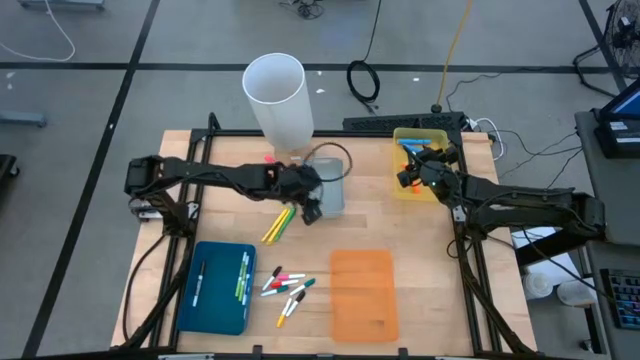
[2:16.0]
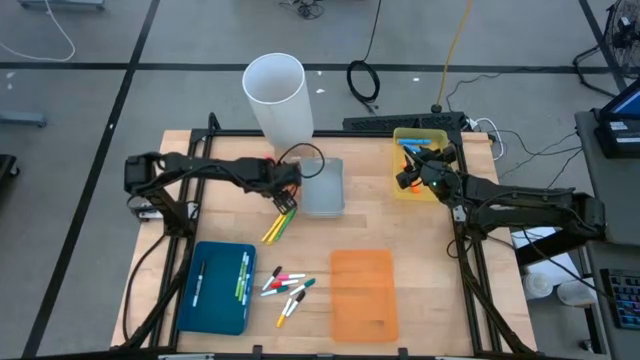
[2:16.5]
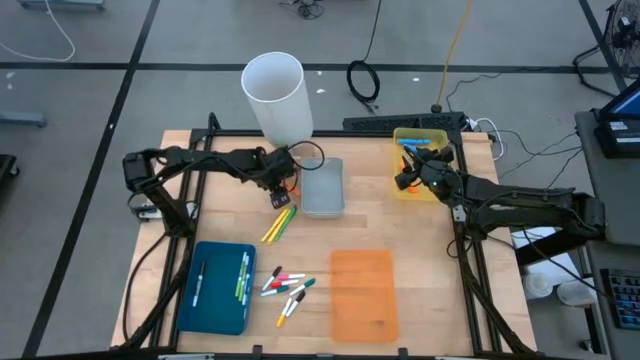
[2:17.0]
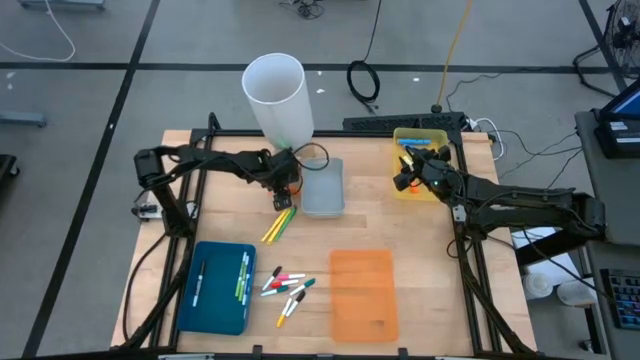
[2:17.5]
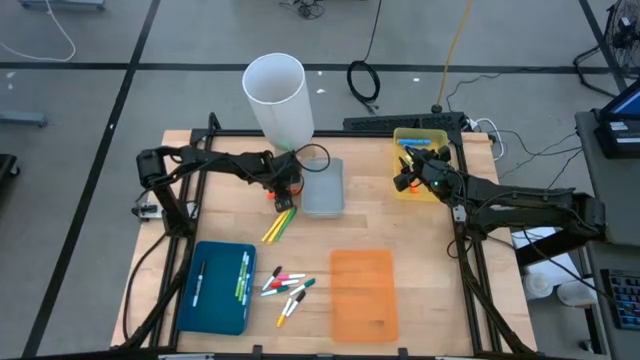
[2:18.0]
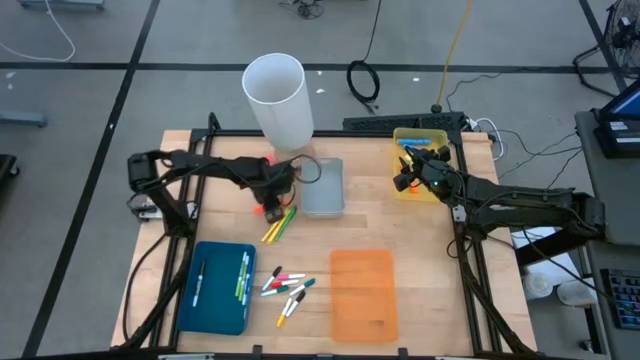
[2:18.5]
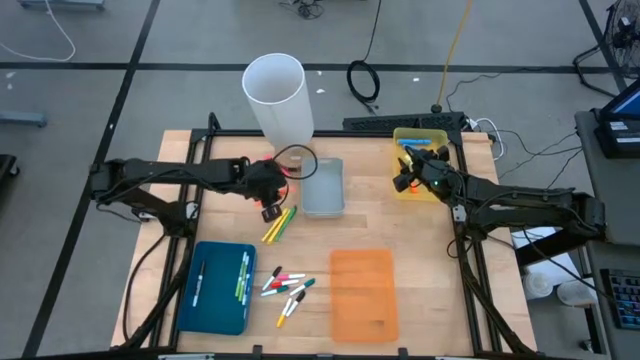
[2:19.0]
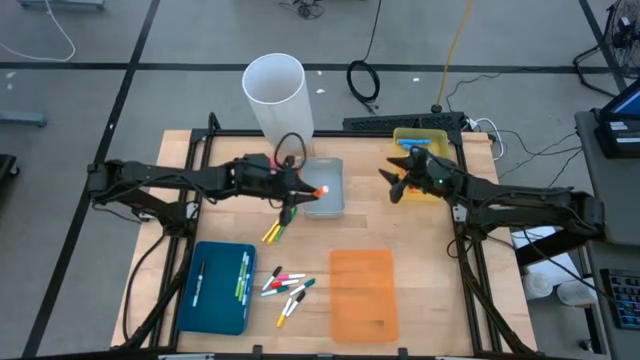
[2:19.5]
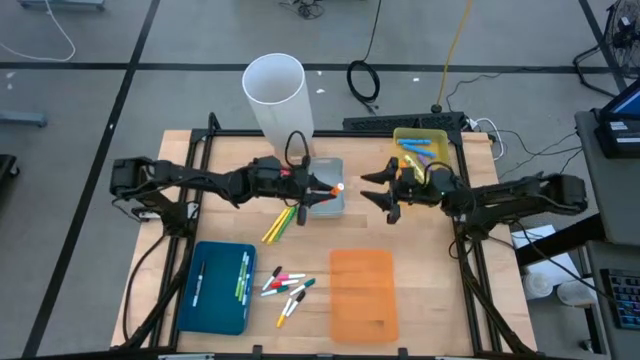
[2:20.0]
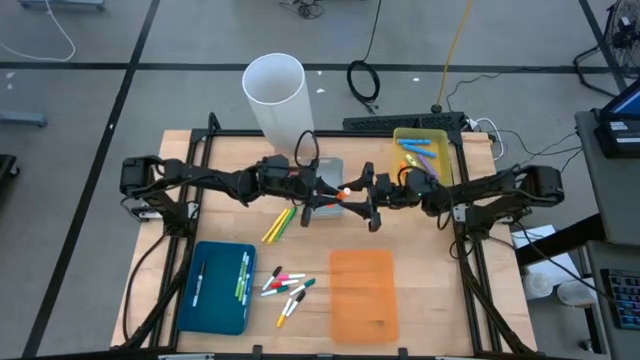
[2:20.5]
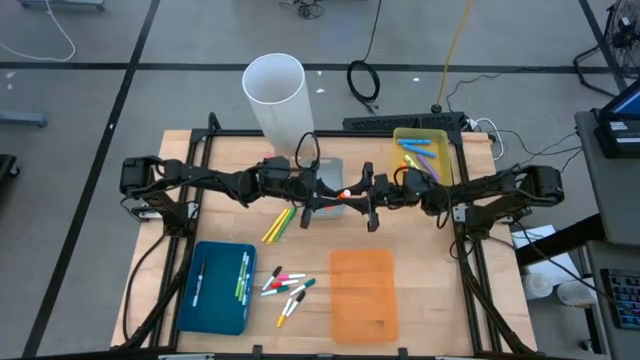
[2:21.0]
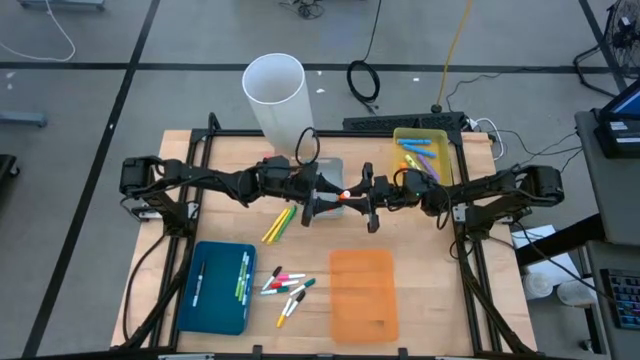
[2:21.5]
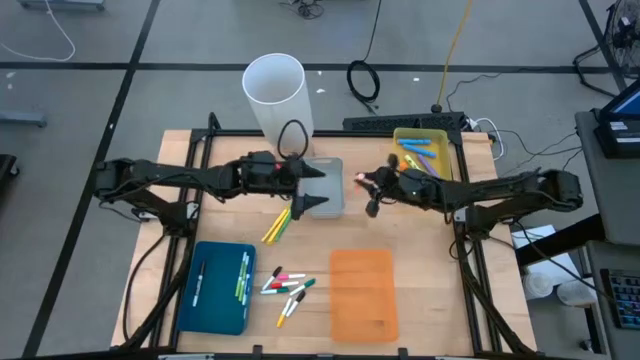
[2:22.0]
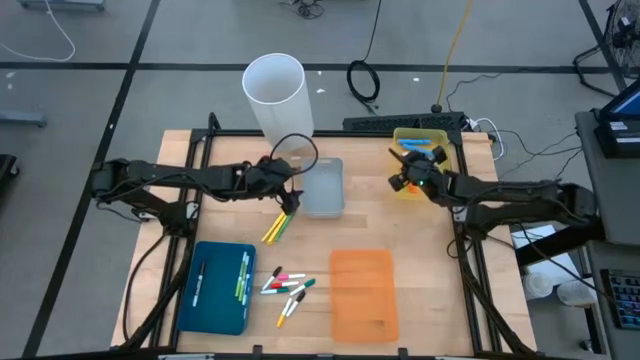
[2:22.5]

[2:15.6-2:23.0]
Task: Pick & Place Markers
Put the large orange highlighter pen in the yellow bin

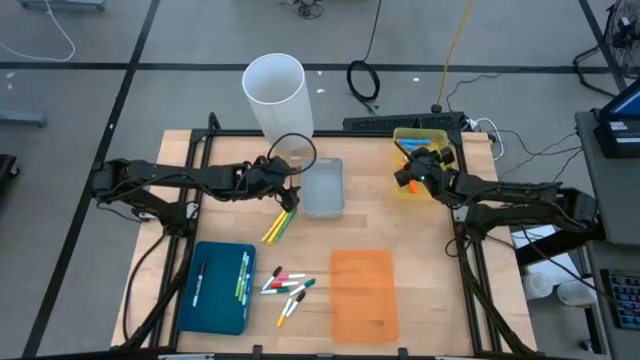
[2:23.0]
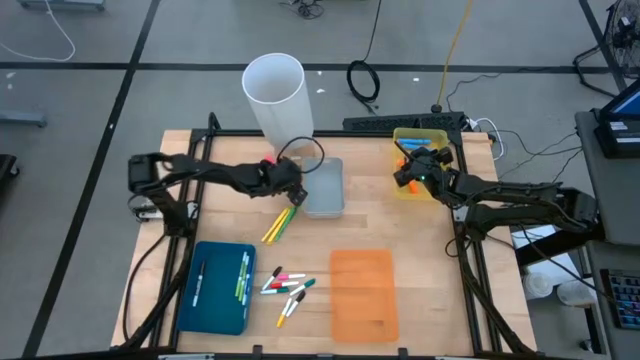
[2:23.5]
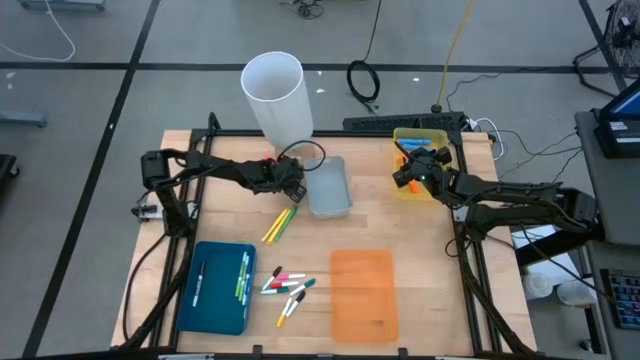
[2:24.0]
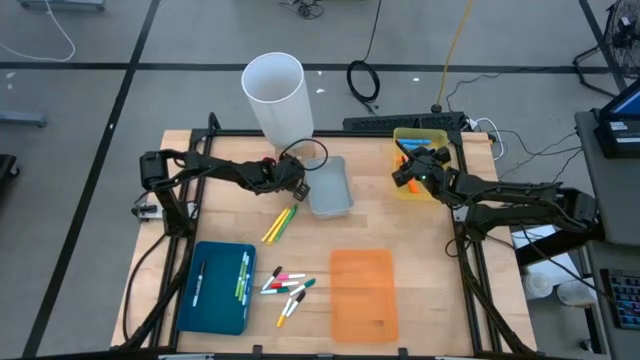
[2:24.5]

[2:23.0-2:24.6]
Put the large pink highlighter pen in the yellow bin

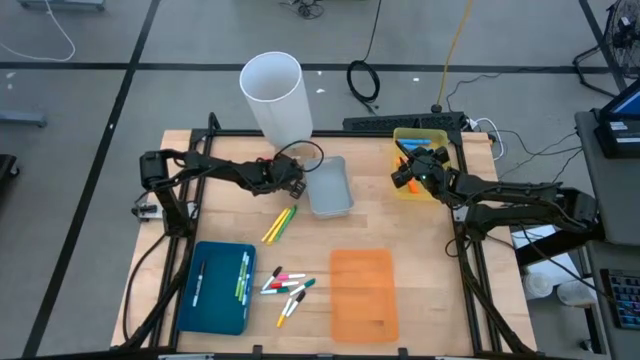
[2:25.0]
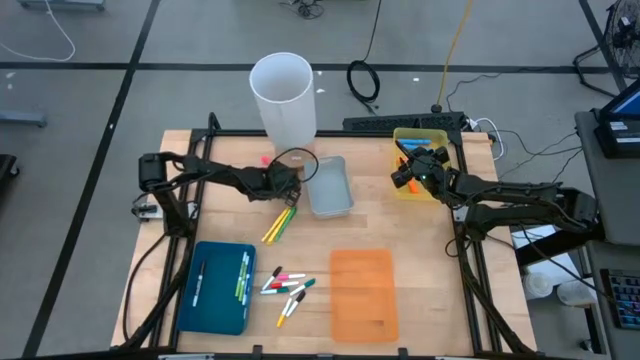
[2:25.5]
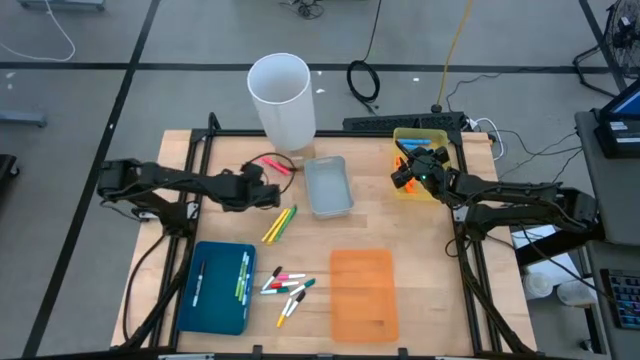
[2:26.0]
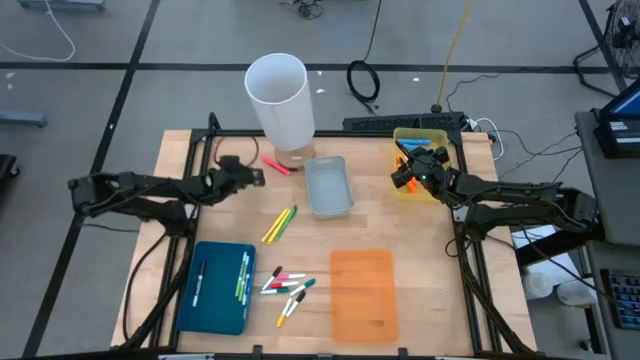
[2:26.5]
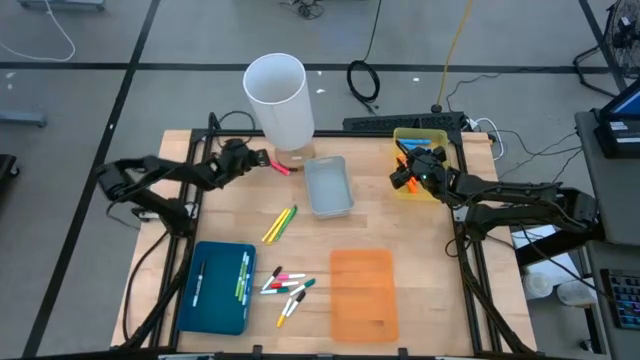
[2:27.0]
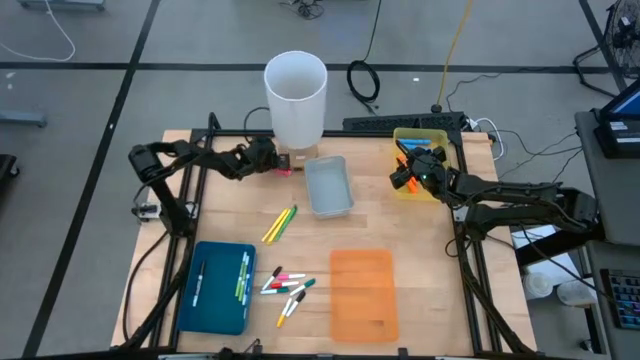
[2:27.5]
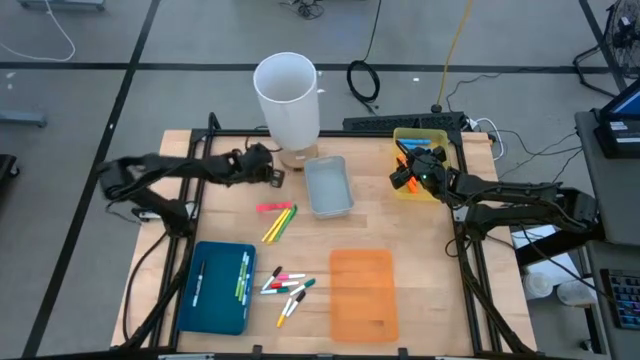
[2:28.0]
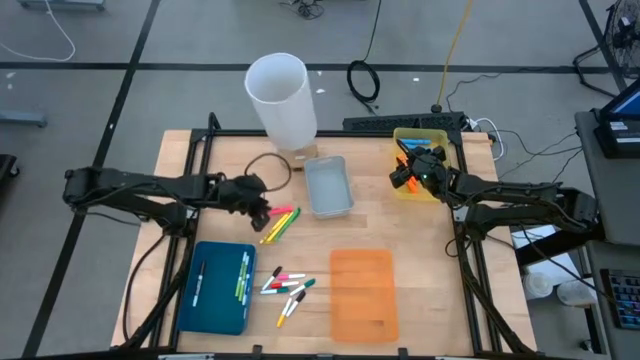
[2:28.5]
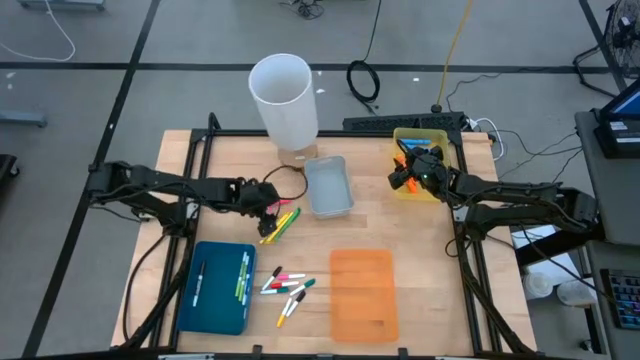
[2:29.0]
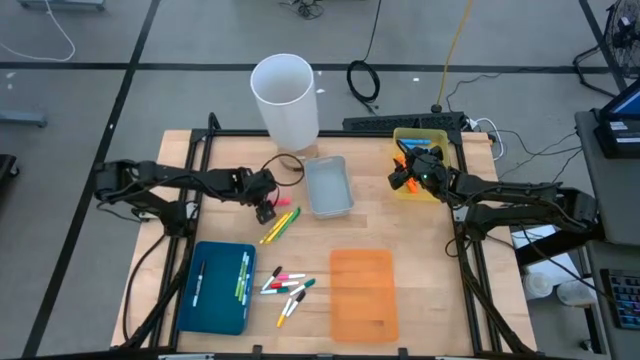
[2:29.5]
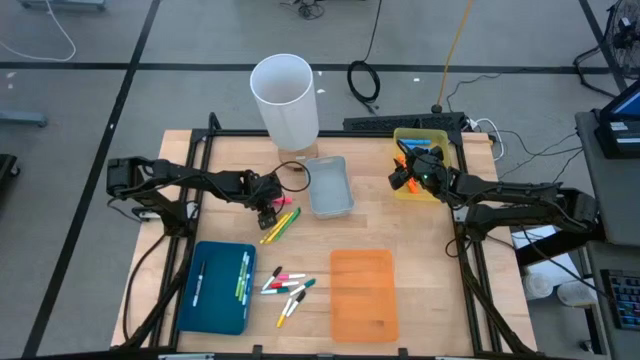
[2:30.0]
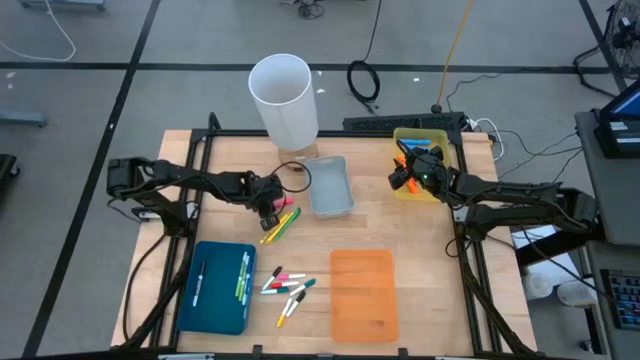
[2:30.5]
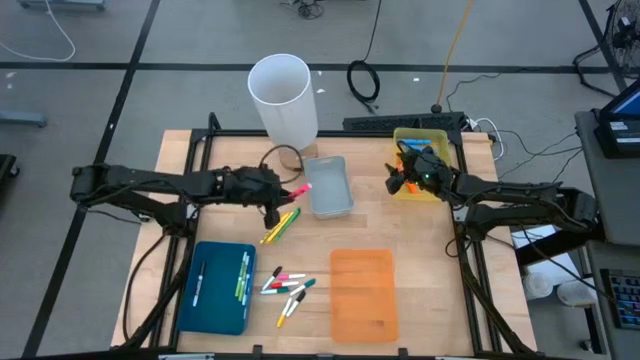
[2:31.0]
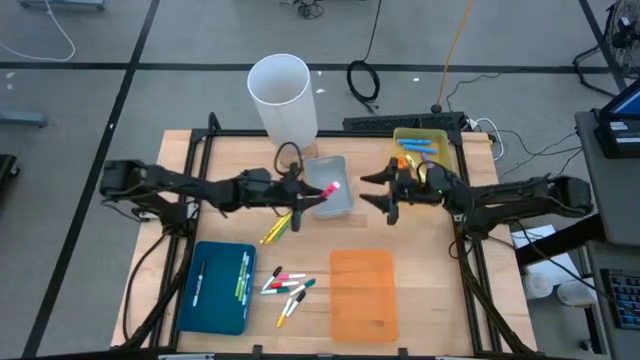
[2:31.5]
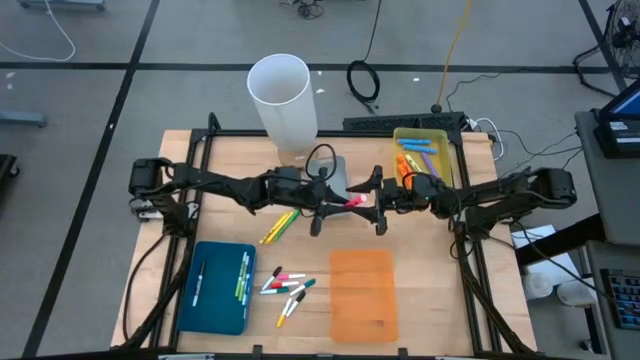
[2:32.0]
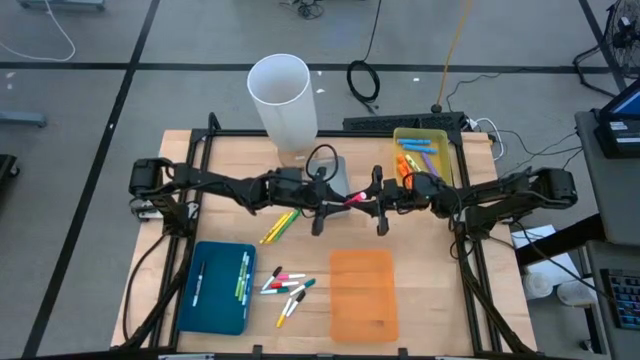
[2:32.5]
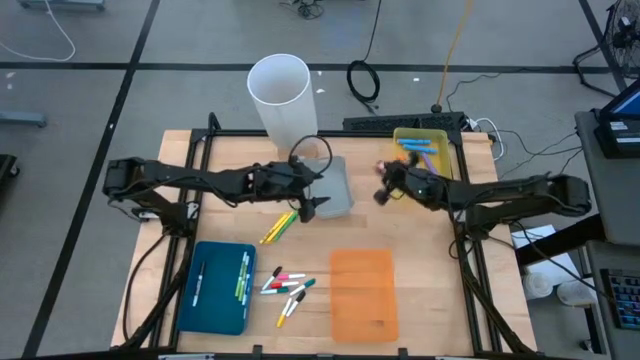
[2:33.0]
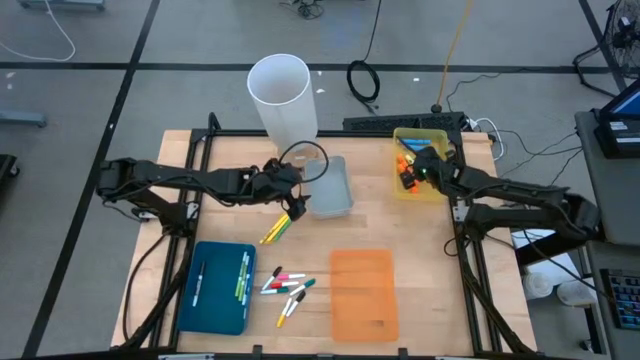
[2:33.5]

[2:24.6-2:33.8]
Put the large pink highlighter pen in the yellow bin

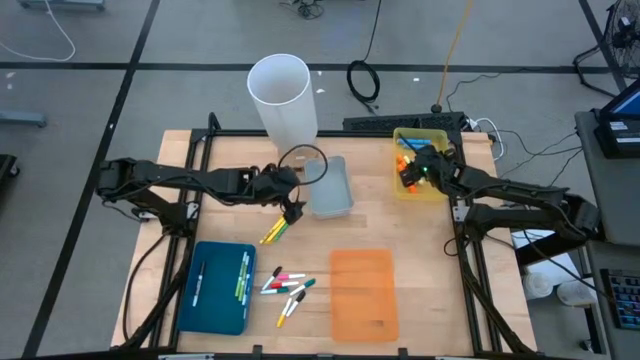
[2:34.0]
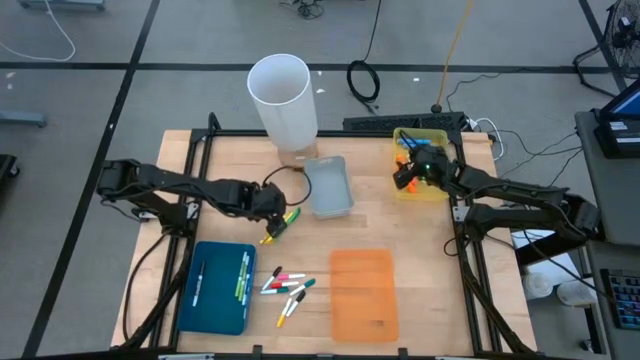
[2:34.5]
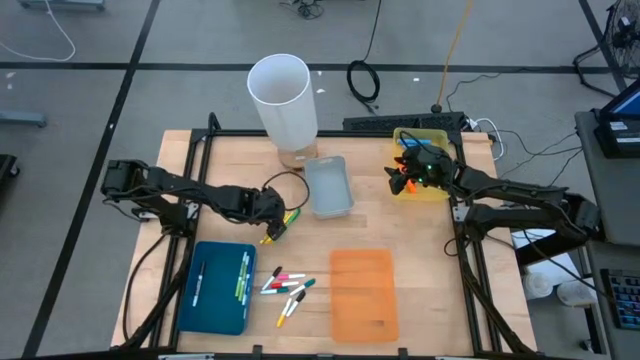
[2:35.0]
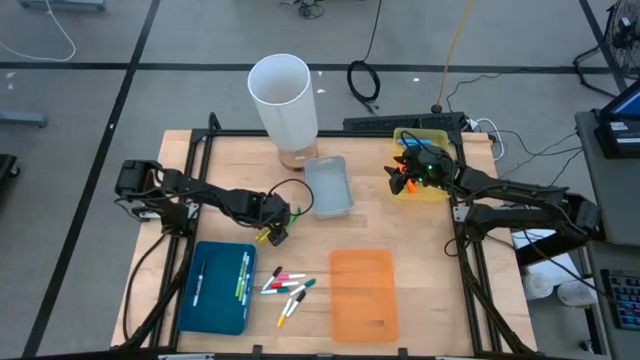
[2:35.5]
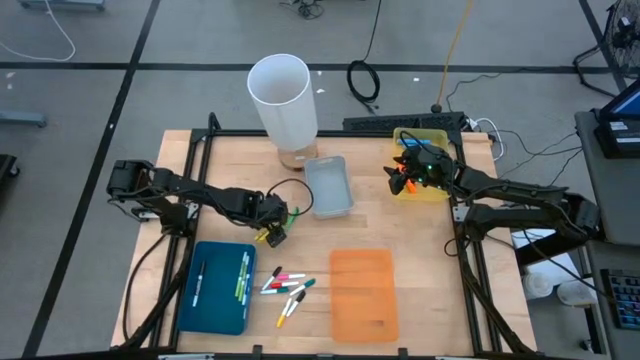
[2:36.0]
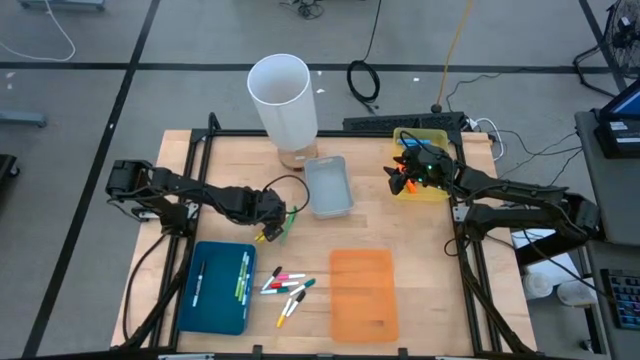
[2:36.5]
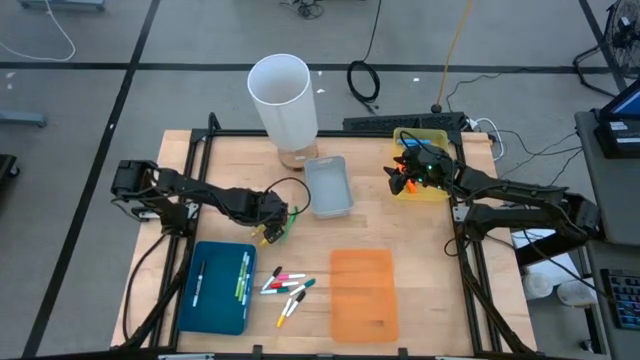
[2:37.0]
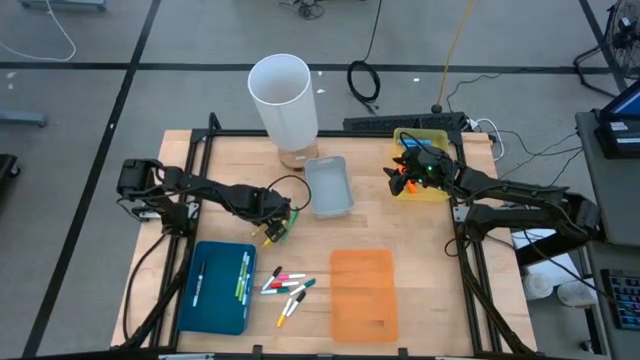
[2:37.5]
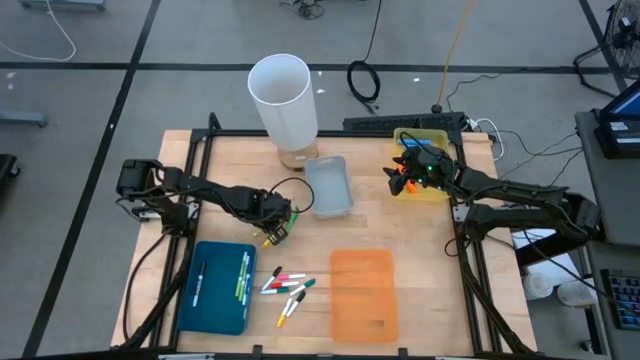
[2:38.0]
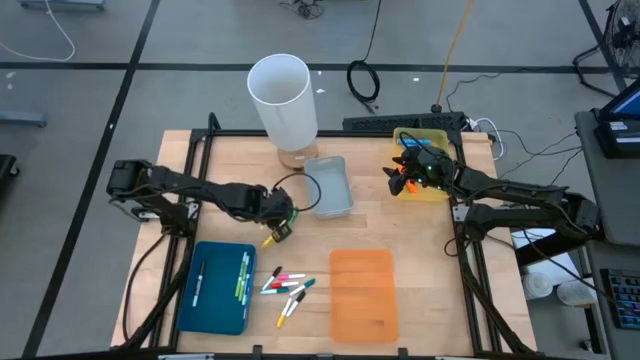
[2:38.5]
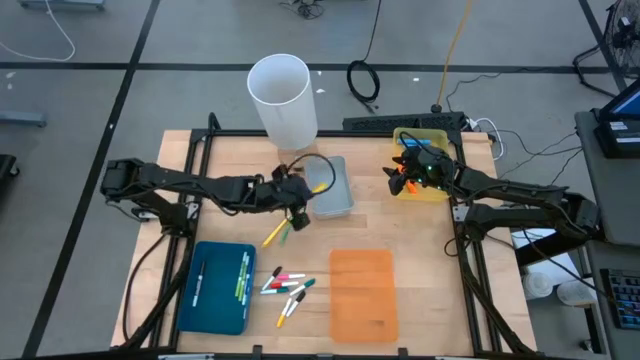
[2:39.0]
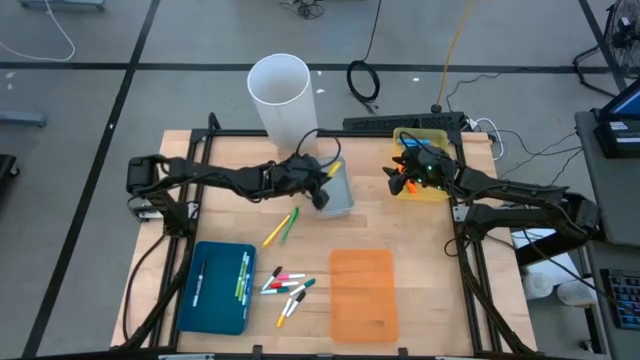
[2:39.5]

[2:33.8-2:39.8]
Put the left yellow pen in the gray bin
